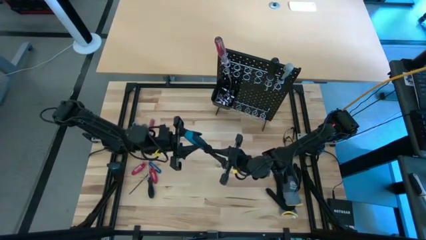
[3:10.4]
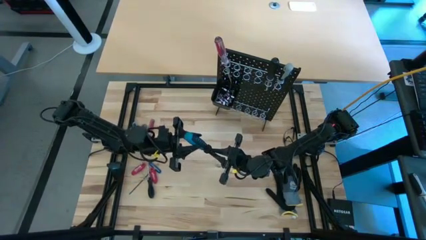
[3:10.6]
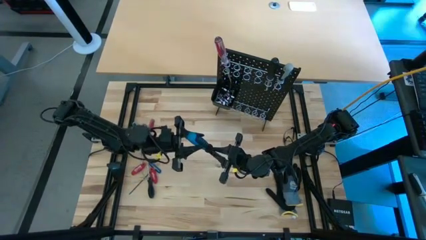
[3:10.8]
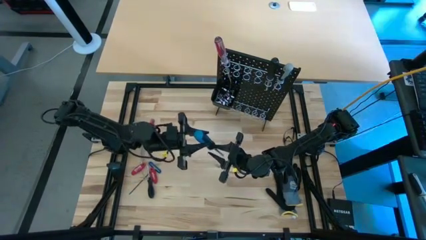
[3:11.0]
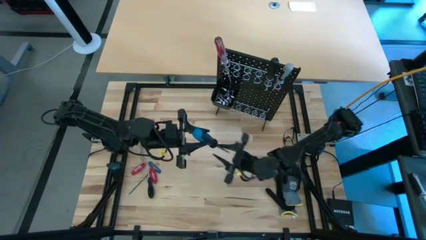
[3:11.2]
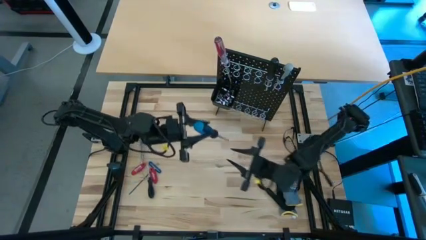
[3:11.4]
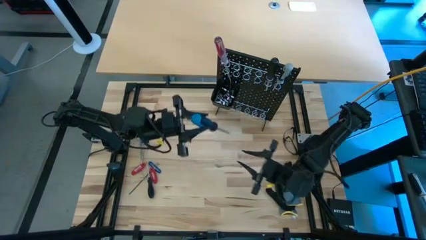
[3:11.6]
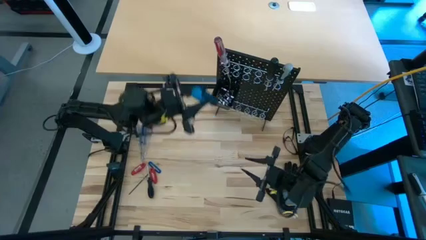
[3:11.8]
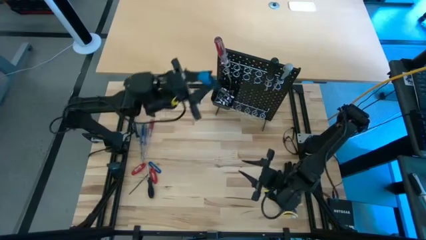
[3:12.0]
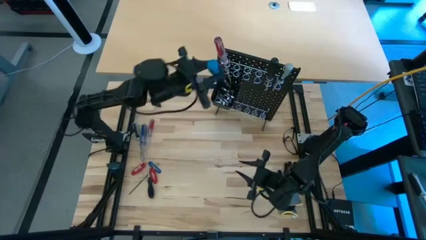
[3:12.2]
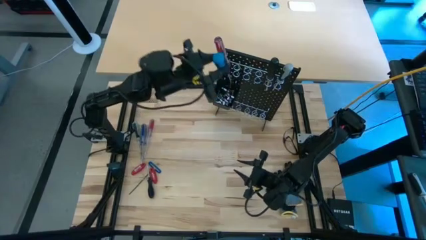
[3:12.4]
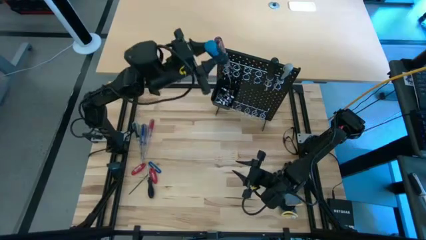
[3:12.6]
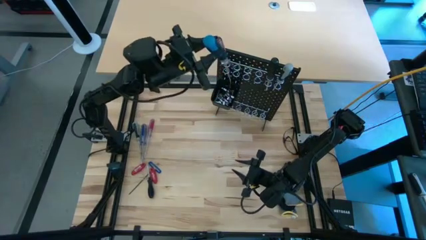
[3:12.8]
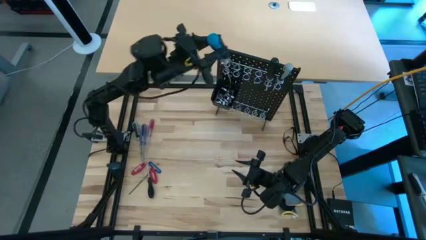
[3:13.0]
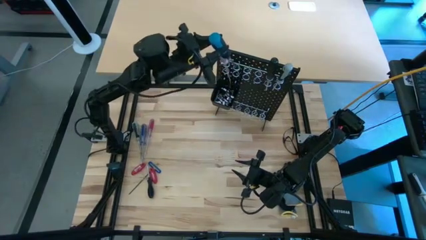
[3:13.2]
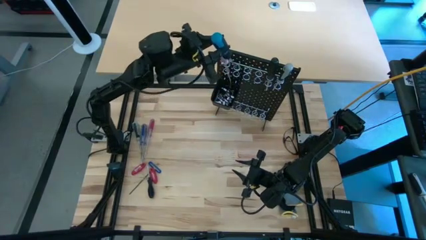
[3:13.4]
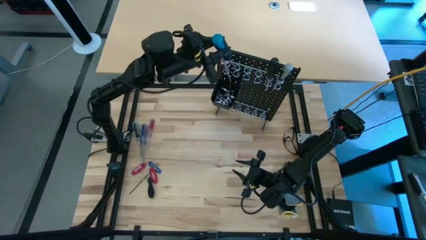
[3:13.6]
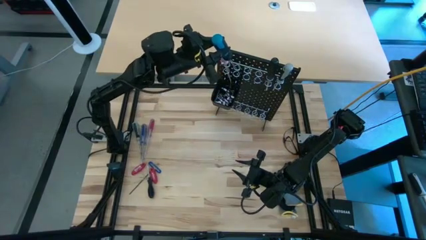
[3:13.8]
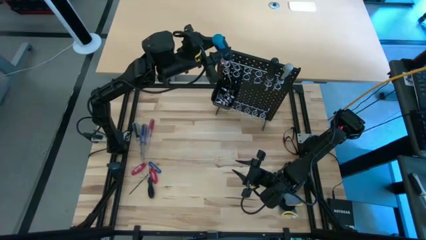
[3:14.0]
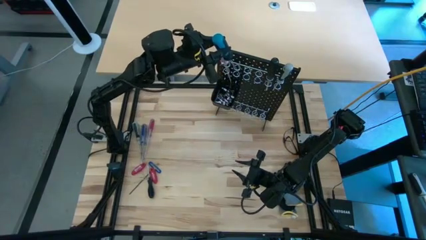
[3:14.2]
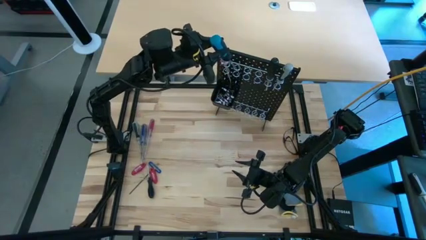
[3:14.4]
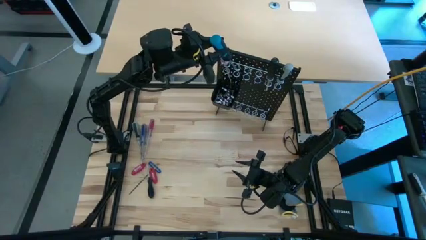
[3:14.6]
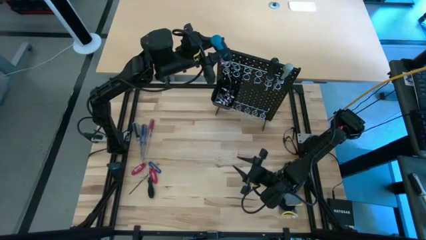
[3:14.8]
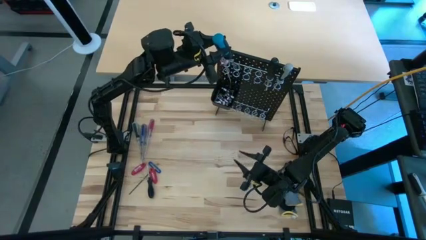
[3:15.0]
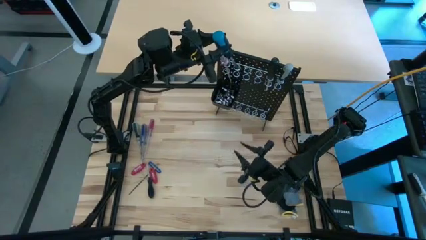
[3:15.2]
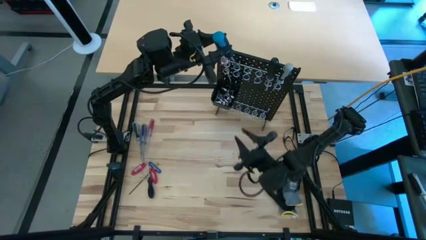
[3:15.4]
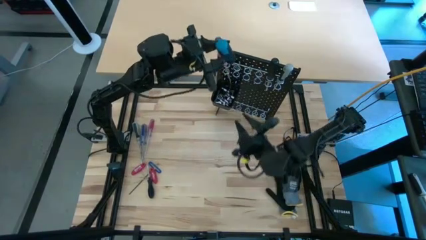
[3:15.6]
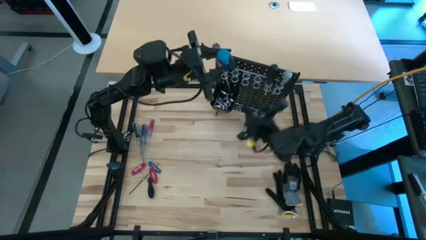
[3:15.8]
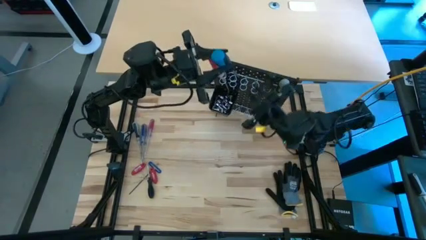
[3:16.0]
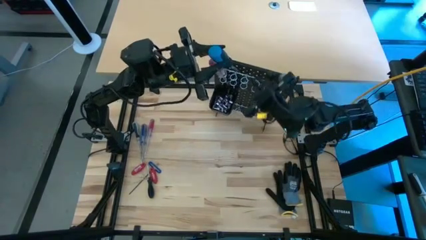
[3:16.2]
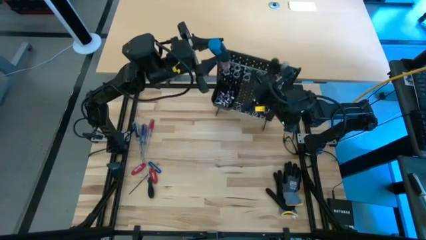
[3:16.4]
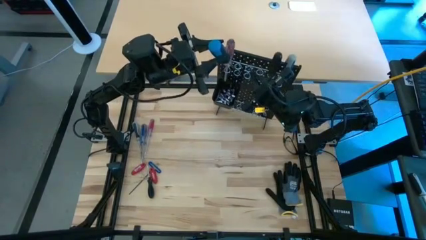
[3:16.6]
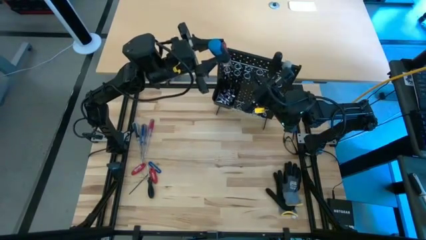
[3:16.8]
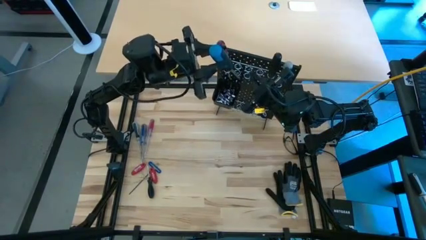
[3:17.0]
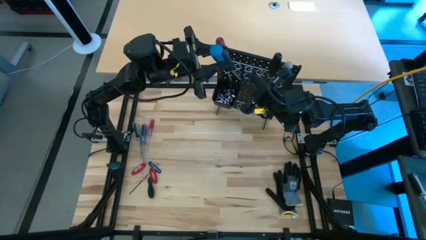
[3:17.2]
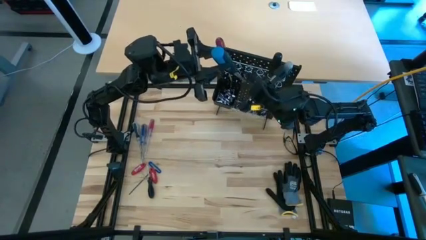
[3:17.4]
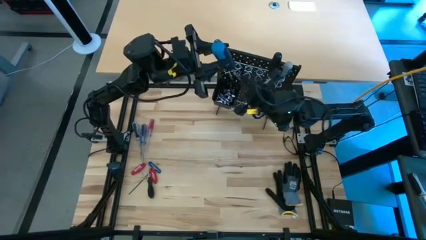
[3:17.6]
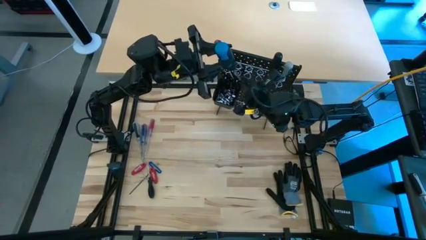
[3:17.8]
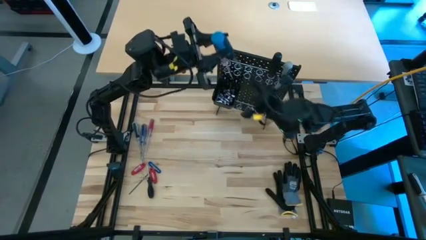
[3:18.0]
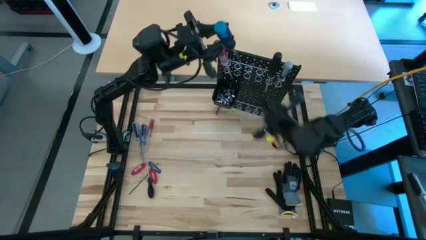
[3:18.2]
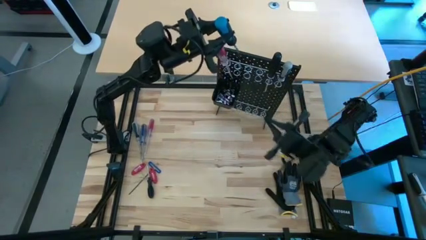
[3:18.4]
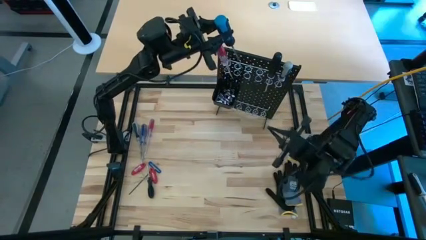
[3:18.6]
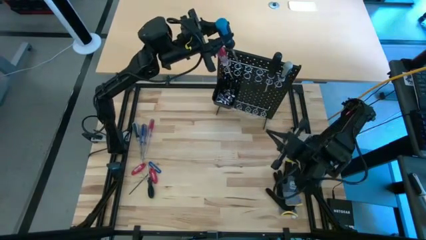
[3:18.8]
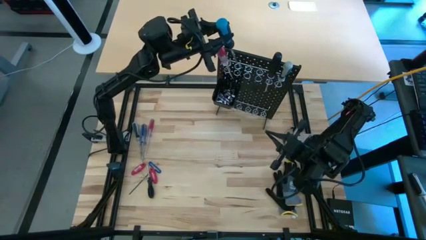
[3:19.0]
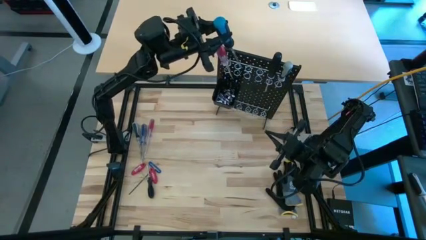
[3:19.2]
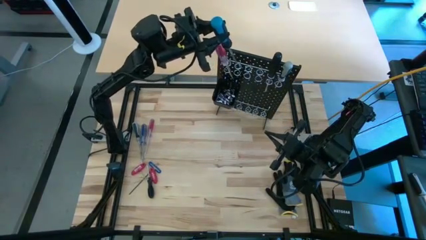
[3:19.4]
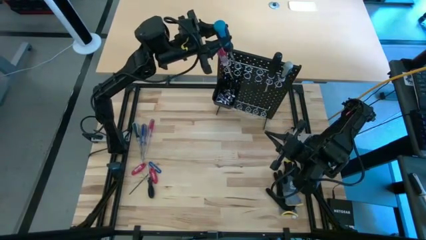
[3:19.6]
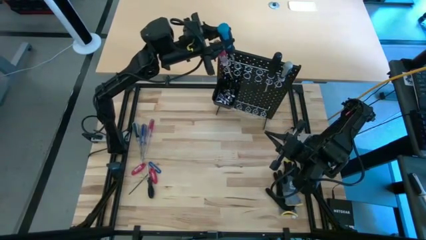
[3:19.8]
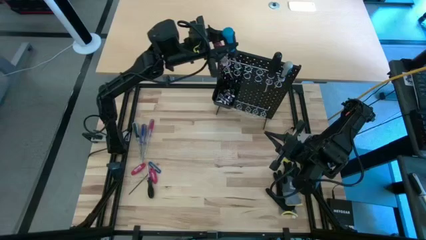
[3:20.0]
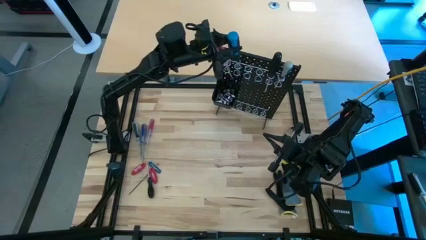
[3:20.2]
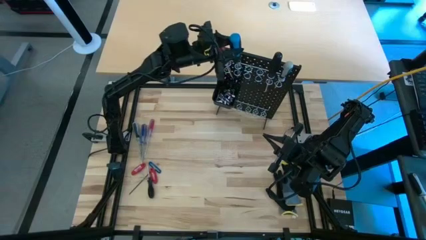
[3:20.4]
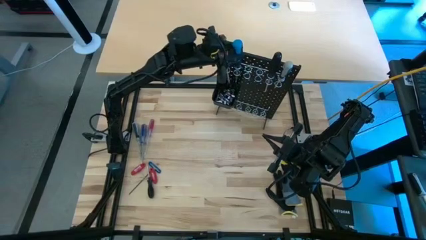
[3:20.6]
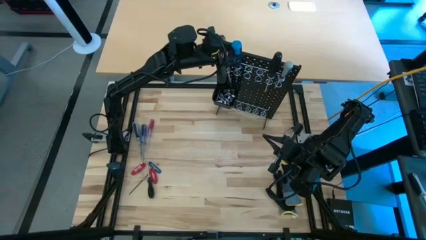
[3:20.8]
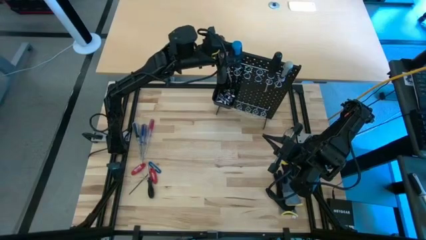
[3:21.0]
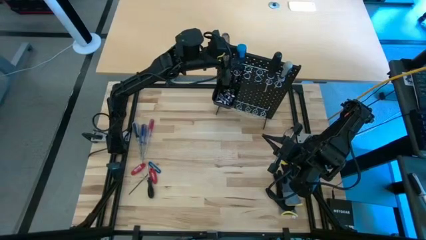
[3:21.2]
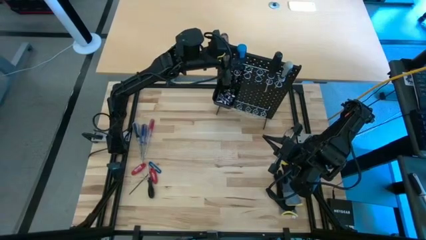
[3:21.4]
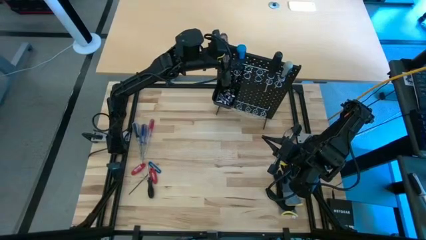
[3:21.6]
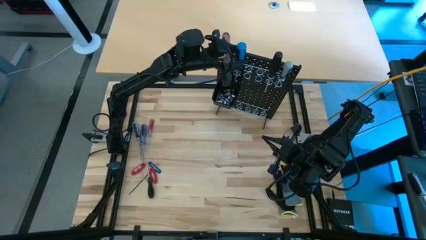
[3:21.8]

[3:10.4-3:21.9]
Task: Hang tools onto peg board
Hang the bottom blue screwdriver on the black pegboard

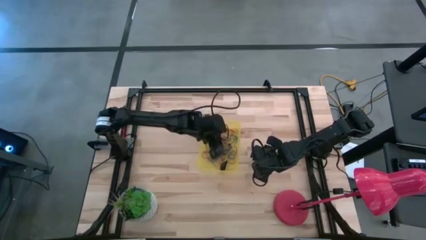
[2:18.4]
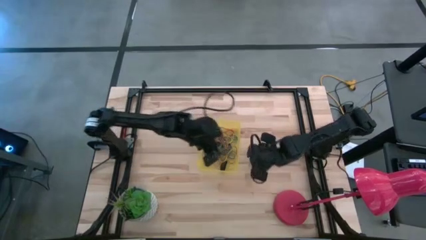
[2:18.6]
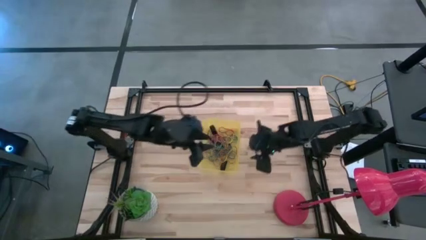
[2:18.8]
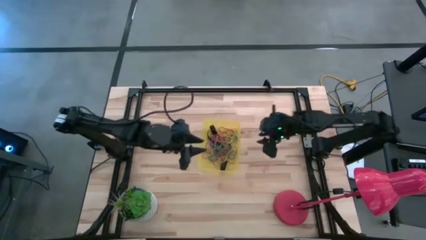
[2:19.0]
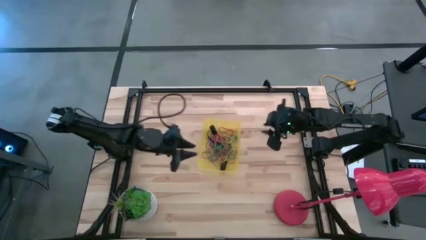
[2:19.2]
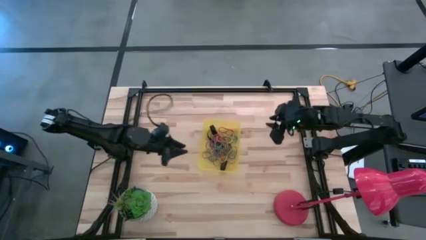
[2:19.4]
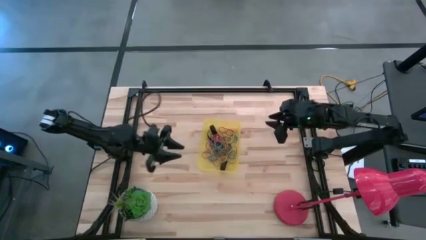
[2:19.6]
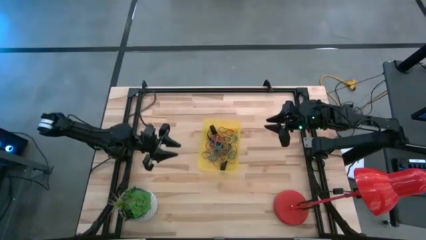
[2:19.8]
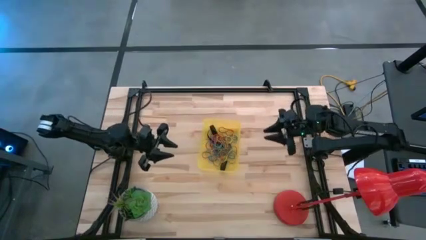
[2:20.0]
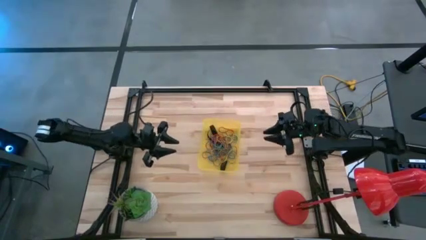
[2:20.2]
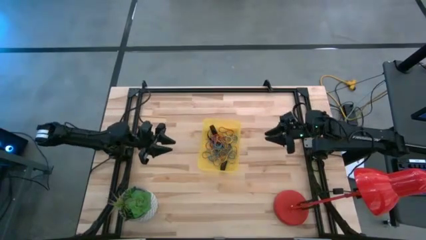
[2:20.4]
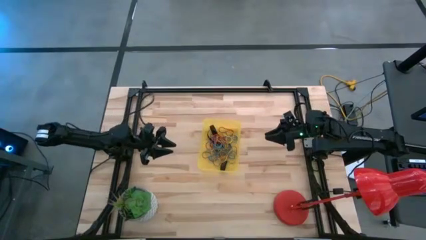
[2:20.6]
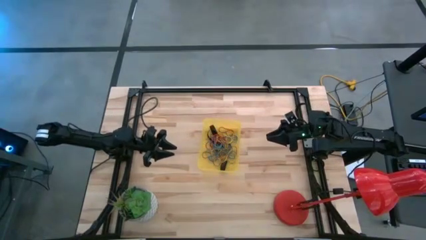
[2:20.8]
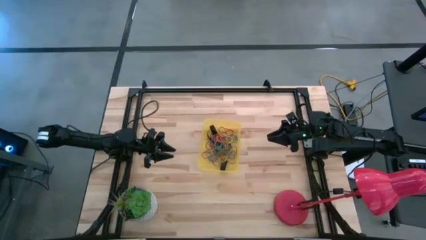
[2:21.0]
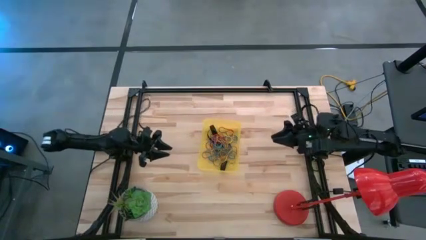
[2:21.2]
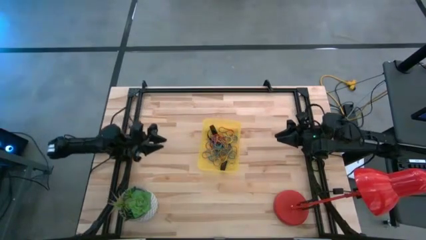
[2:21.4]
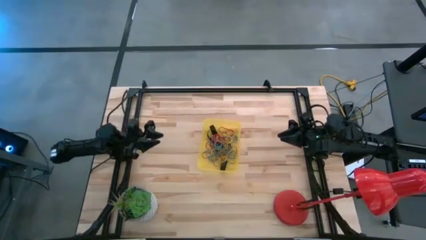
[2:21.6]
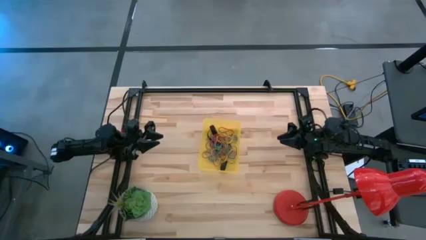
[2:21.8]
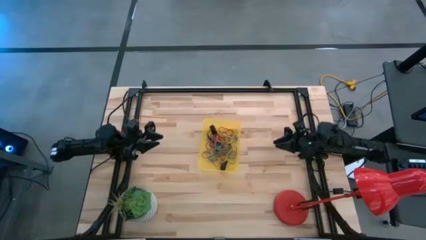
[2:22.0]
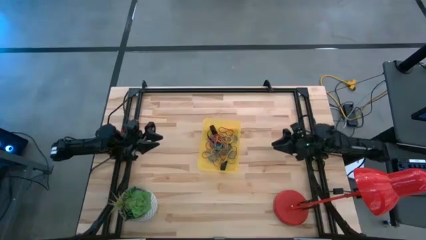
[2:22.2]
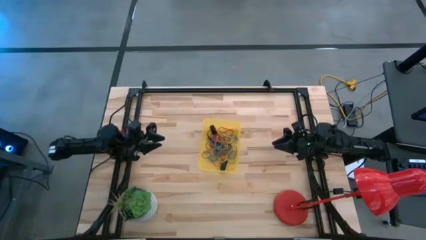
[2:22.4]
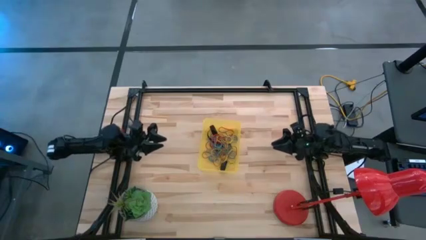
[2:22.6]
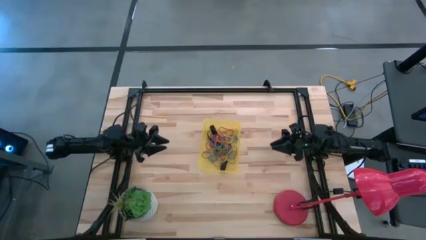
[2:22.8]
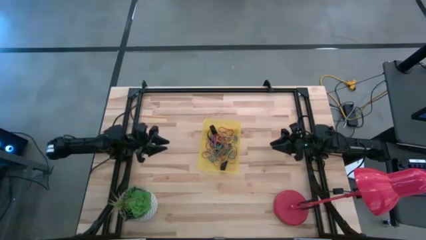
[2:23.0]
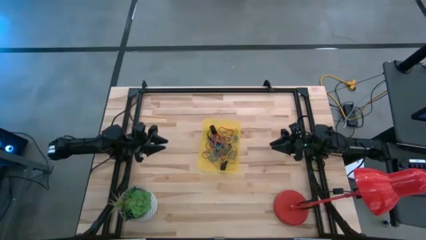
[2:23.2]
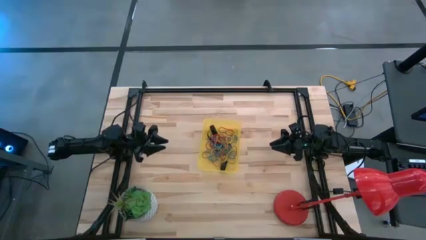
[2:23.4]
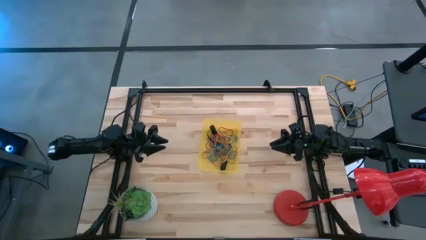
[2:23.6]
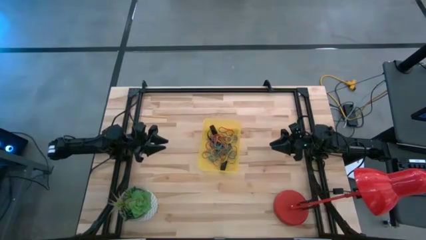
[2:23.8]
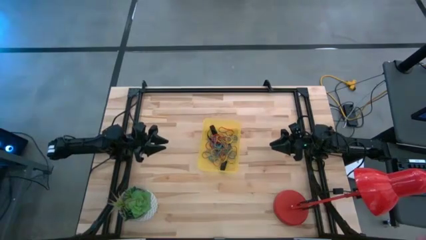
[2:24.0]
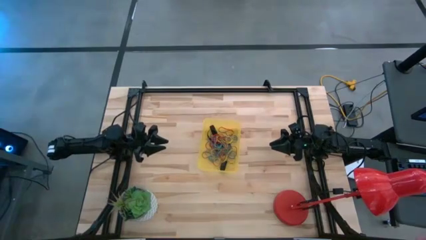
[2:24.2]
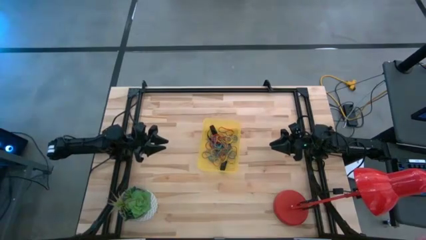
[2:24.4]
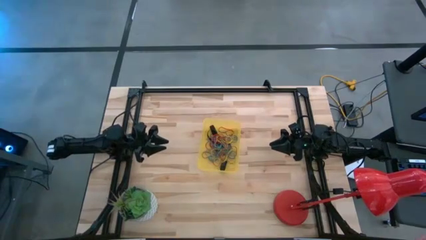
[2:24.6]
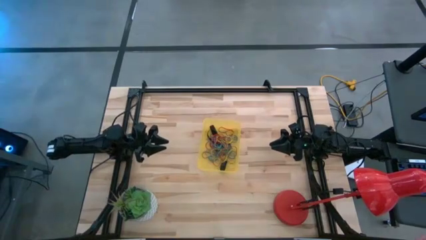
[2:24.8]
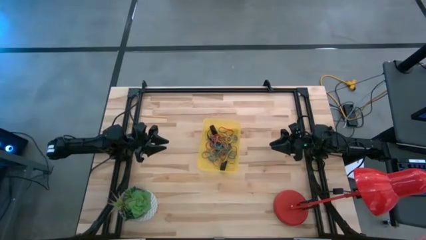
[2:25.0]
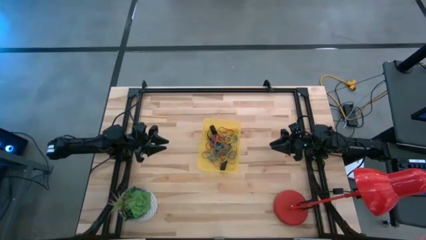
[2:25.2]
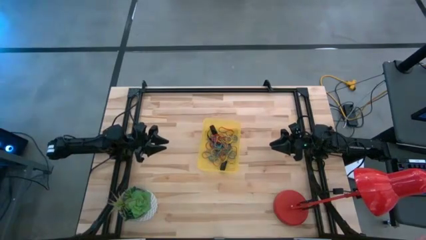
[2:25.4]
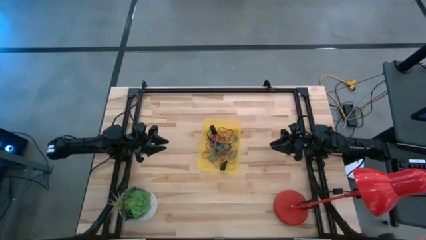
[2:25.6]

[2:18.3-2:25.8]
Task: Pick and place rubber bands into bin
Return to Home Position
